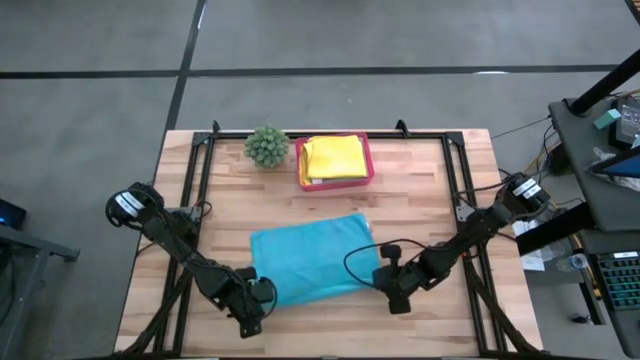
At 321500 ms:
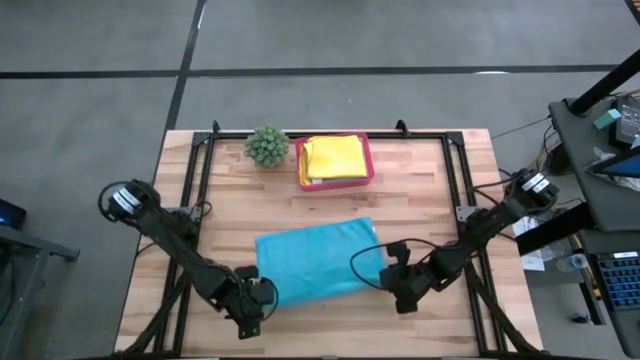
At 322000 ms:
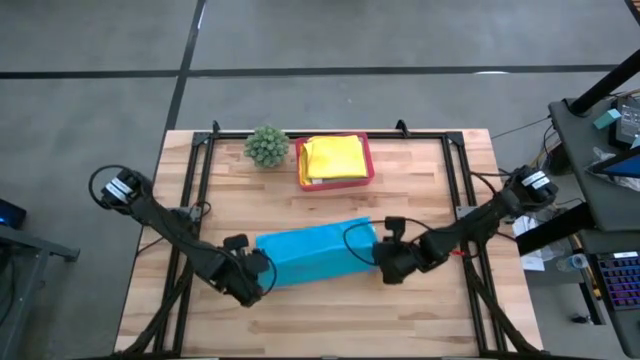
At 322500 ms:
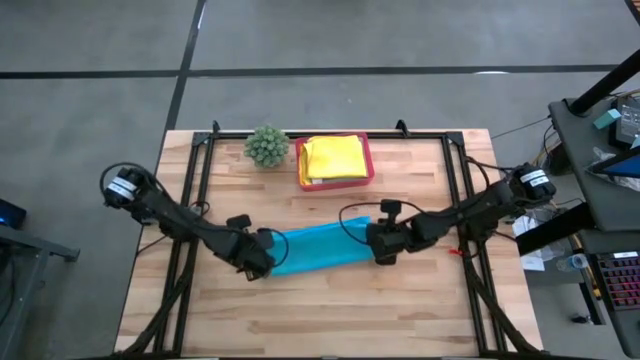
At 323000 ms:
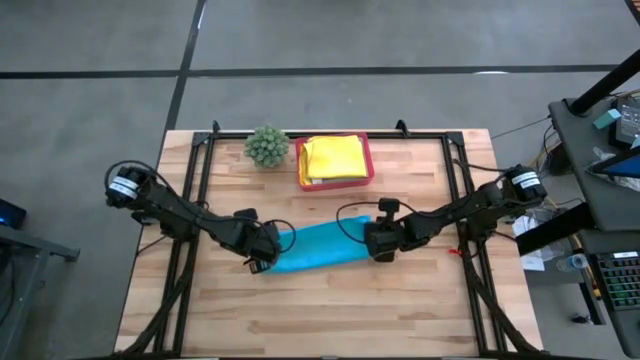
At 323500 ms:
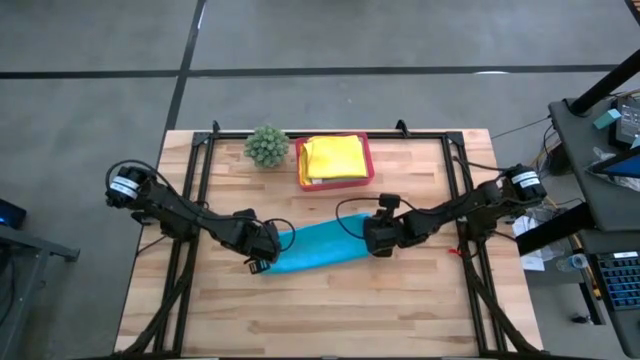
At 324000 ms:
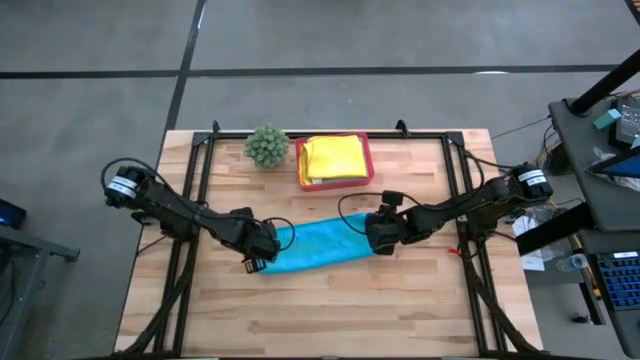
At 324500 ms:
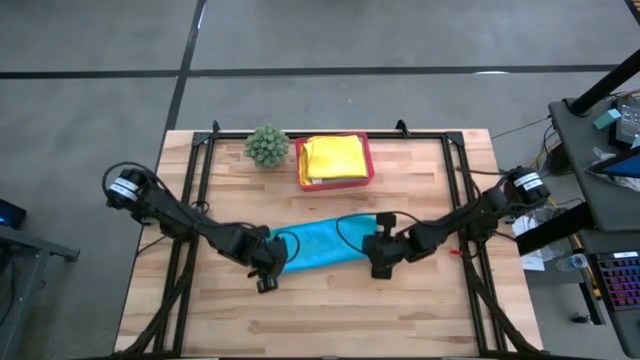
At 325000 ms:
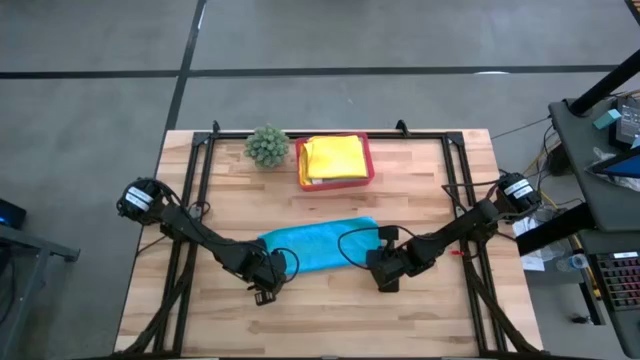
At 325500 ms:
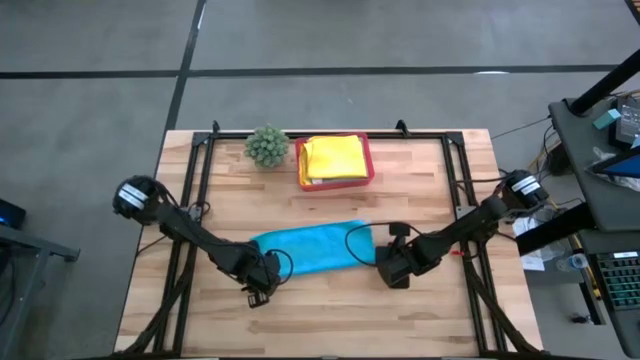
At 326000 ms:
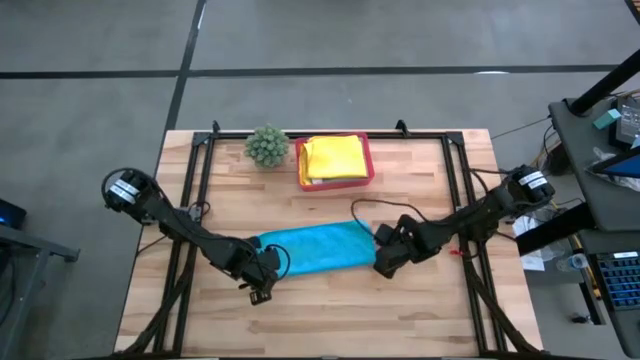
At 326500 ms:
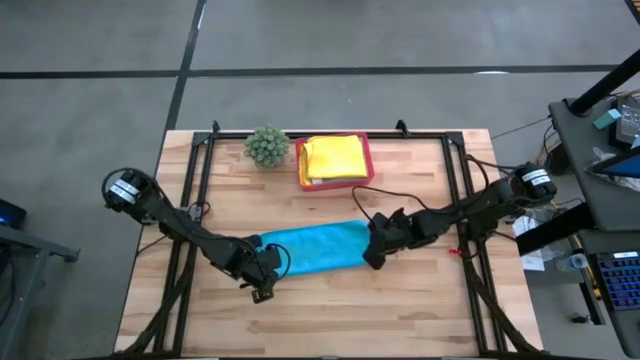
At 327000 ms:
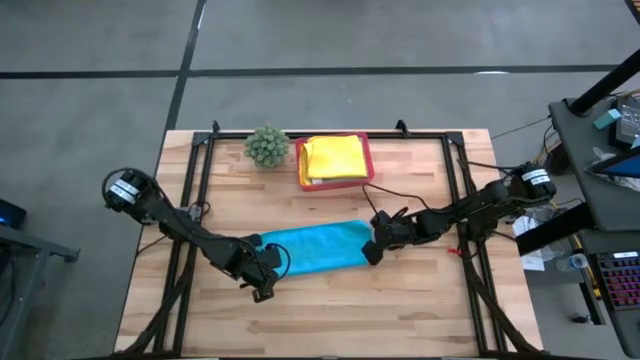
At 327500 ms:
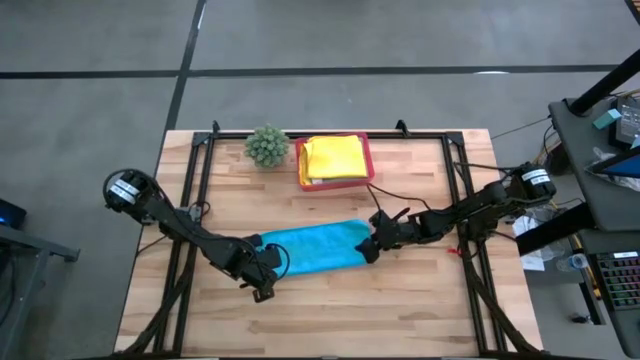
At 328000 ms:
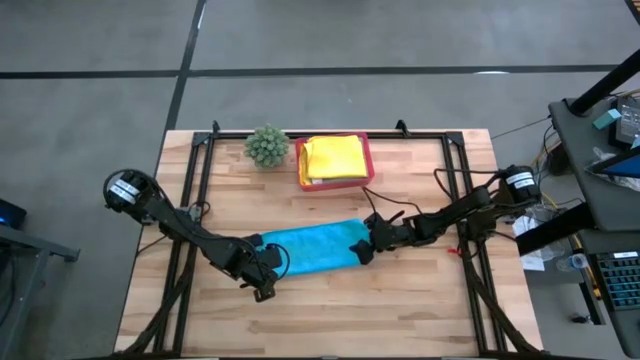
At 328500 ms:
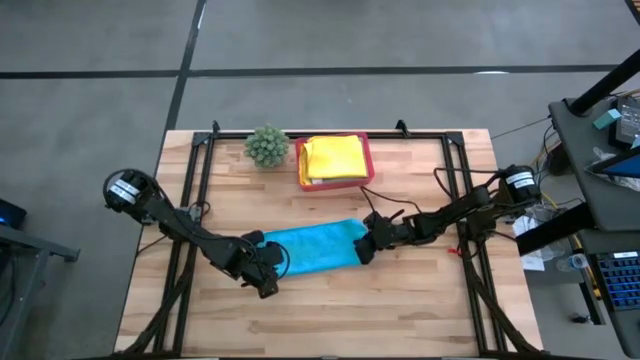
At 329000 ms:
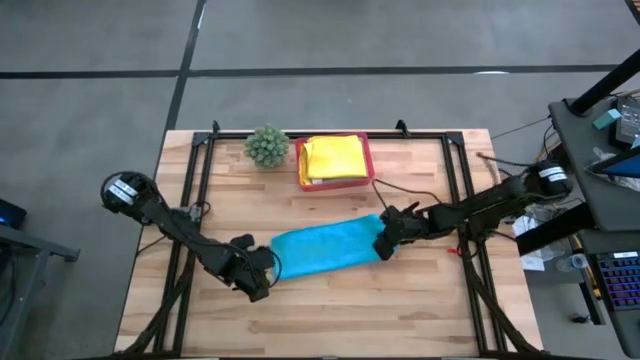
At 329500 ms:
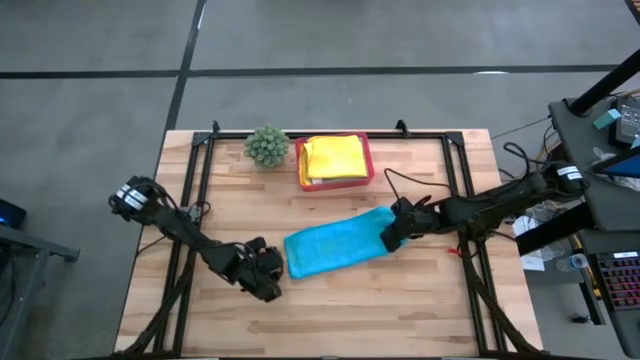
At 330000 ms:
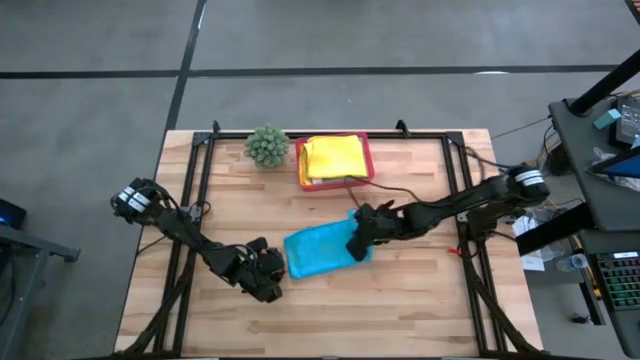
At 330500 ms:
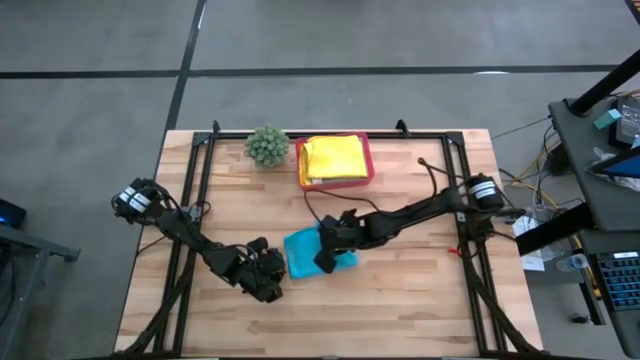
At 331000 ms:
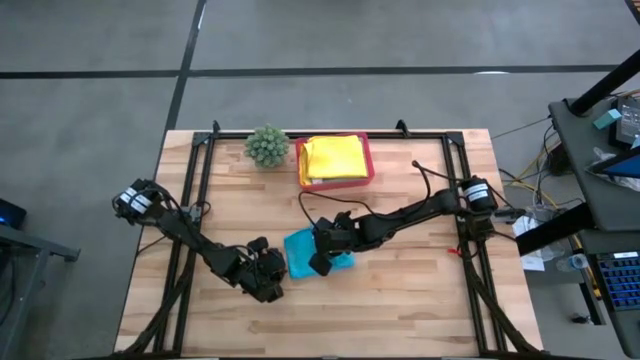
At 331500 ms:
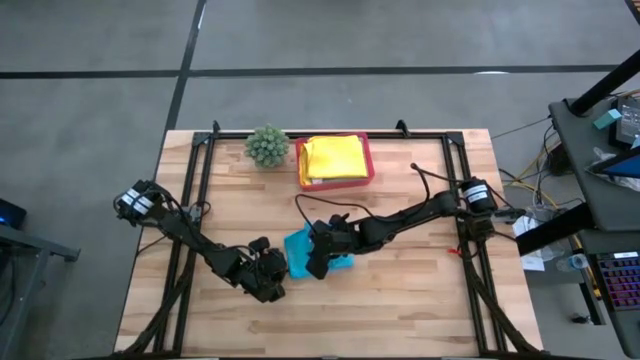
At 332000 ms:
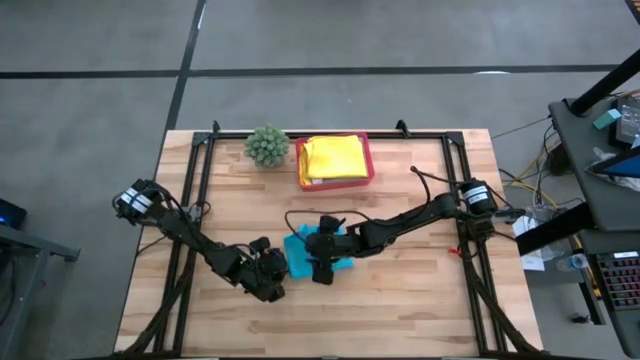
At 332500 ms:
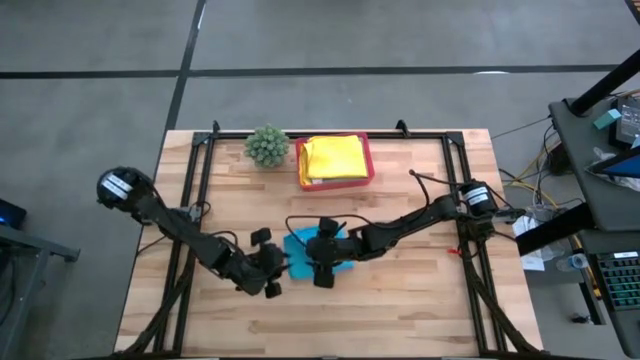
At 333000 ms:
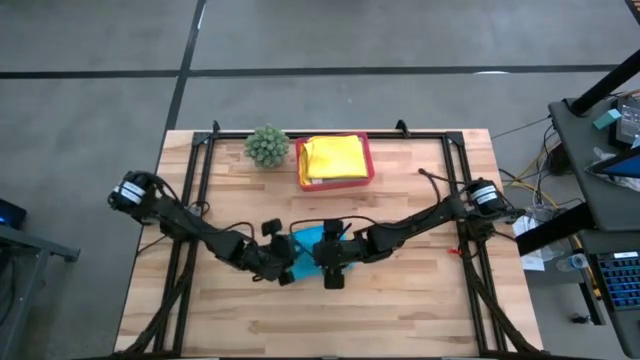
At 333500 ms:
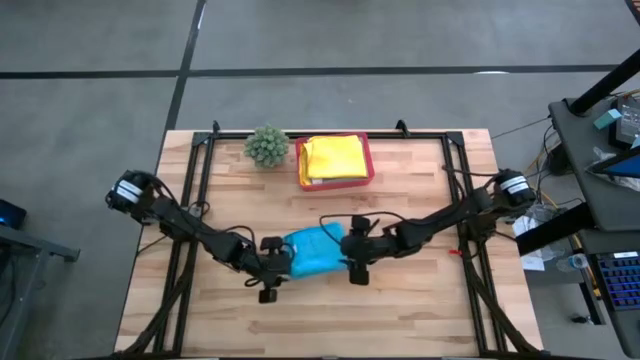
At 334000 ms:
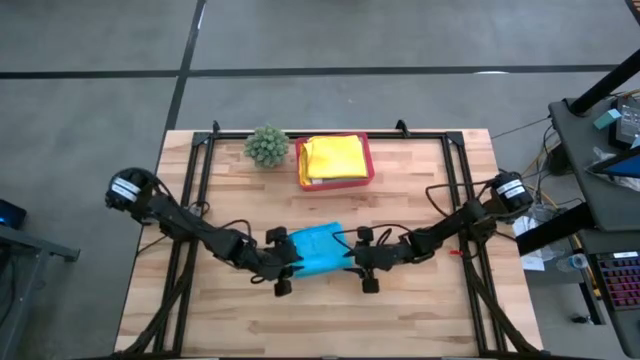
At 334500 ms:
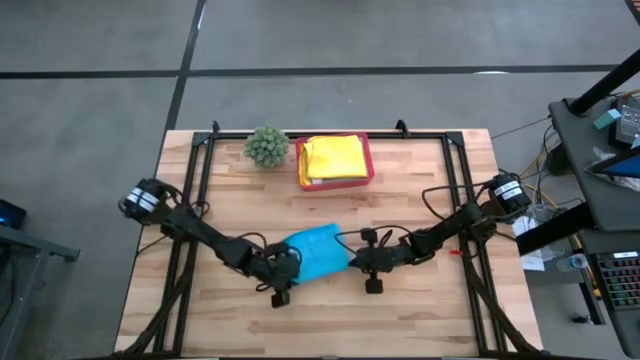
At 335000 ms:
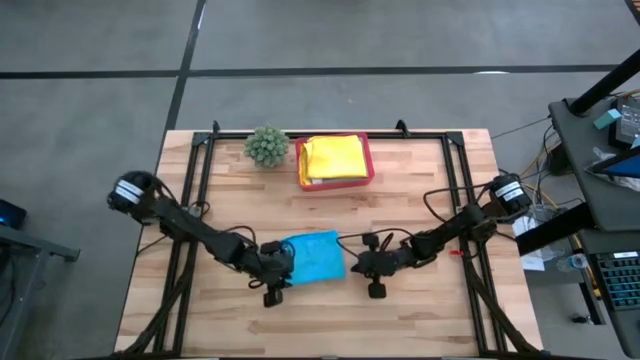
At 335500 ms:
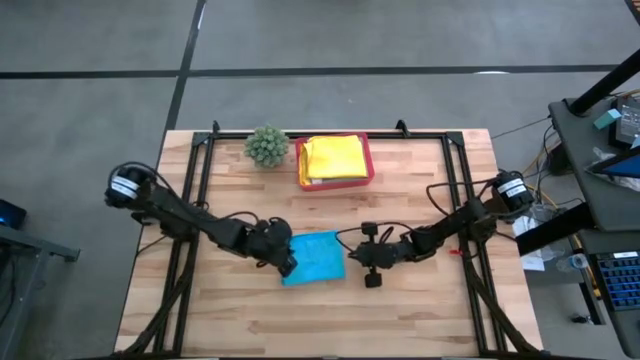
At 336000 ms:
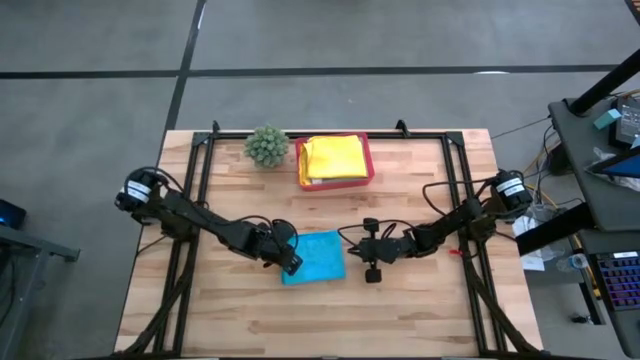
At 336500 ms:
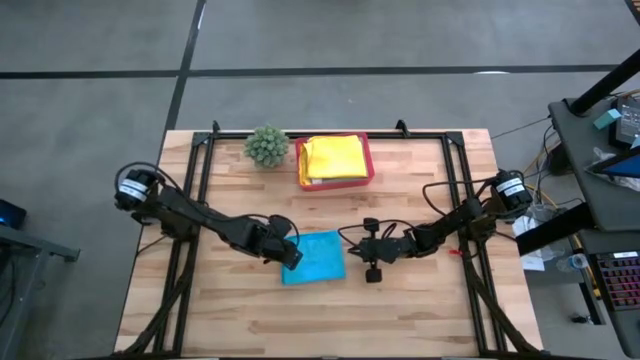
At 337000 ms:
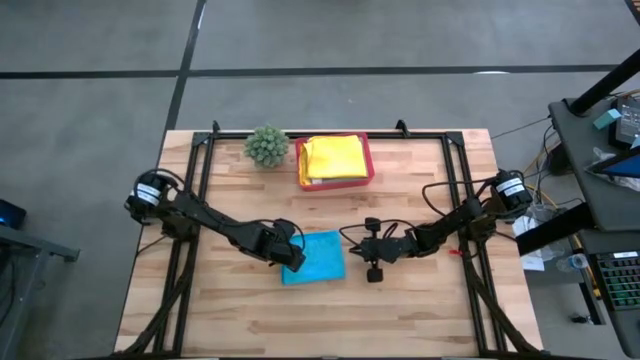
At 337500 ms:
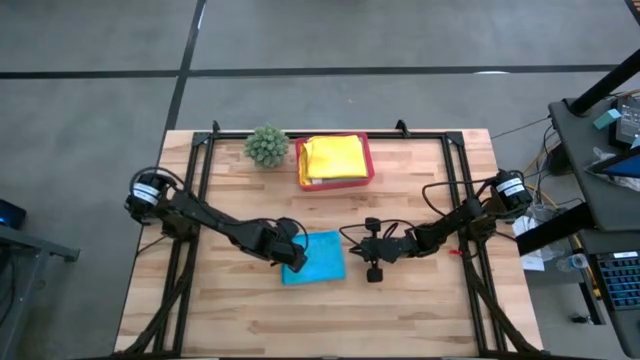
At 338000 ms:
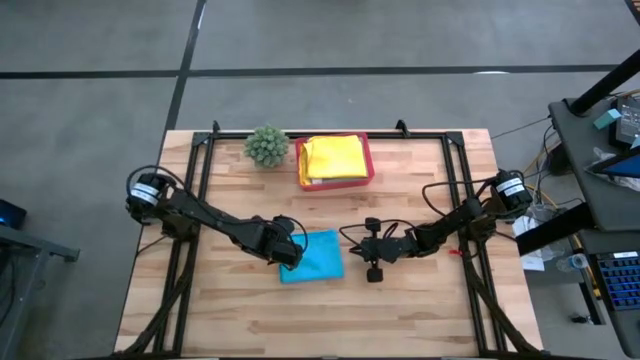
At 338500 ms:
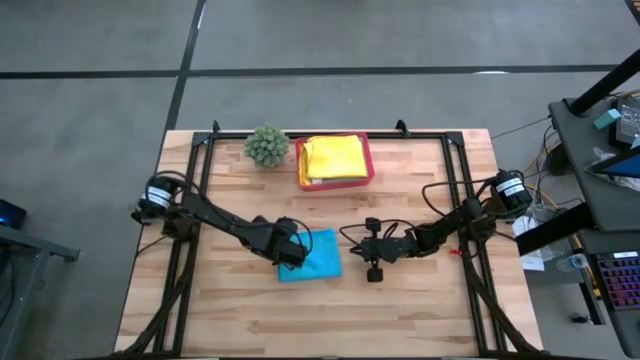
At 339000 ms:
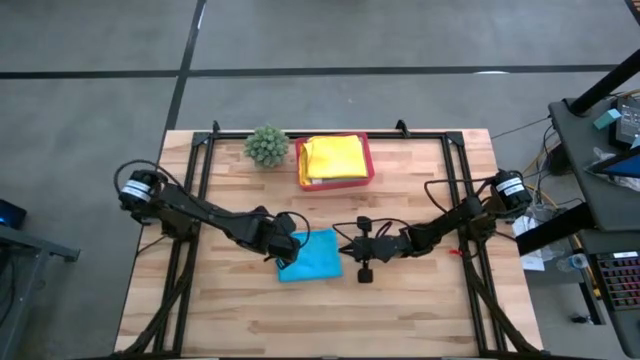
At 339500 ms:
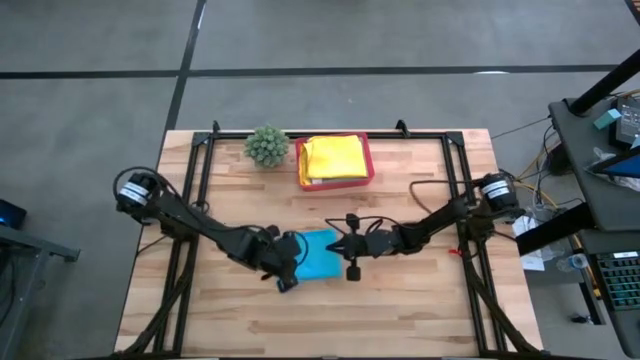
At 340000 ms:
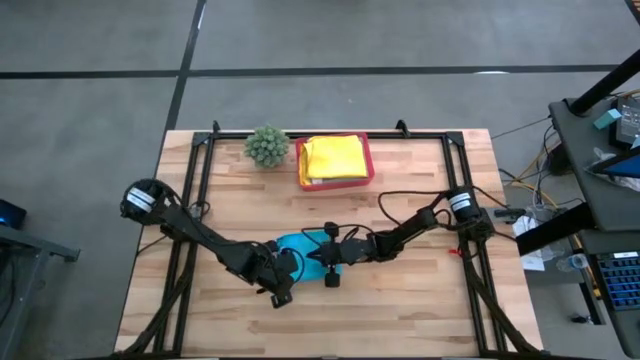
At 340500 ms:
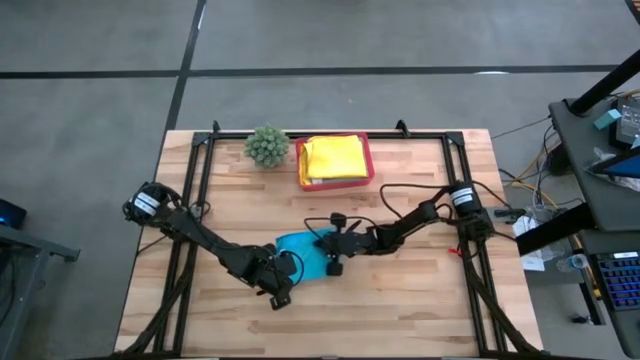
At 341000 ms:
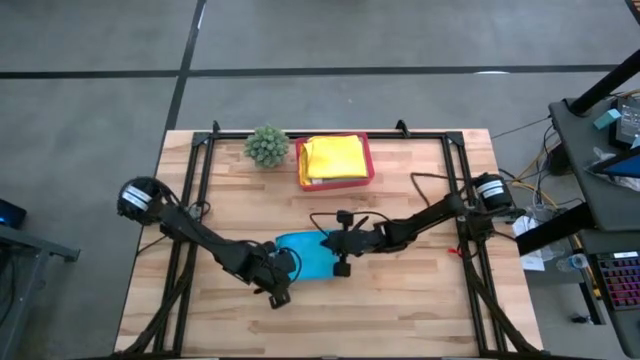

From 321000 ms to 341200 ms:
Task: Fold microfiber towels
Fold the blue microfiber towel
